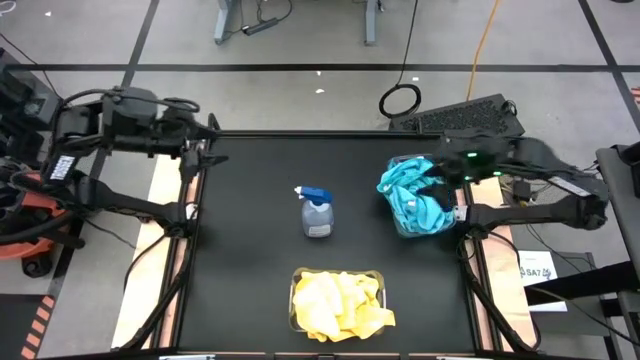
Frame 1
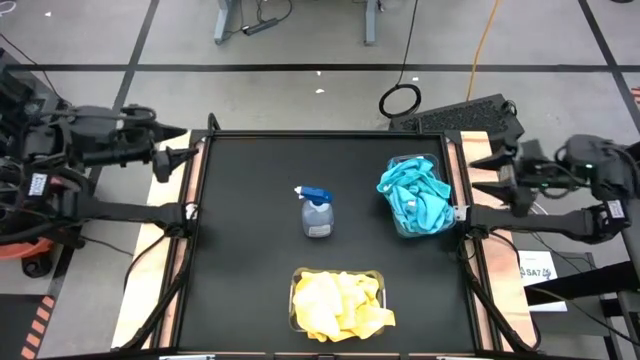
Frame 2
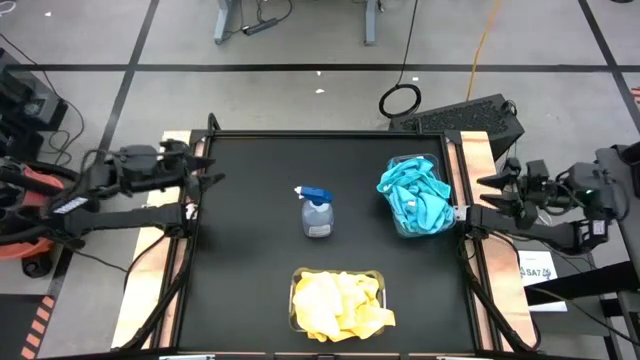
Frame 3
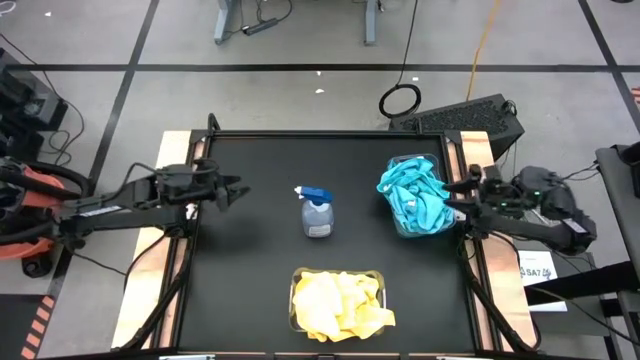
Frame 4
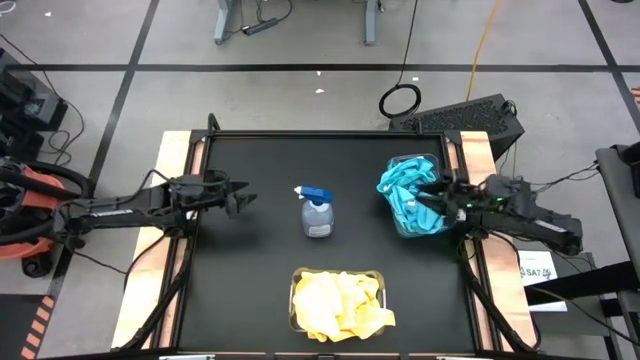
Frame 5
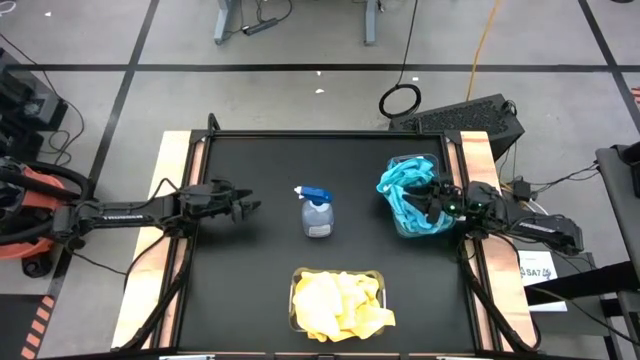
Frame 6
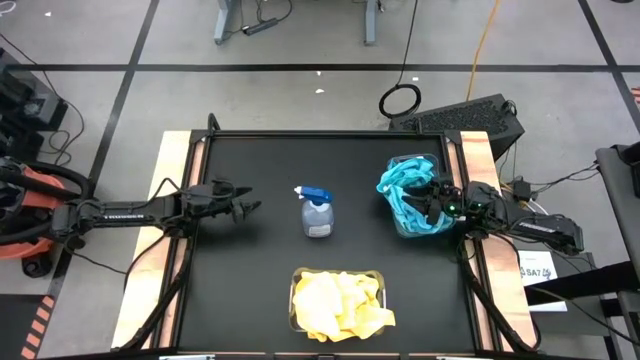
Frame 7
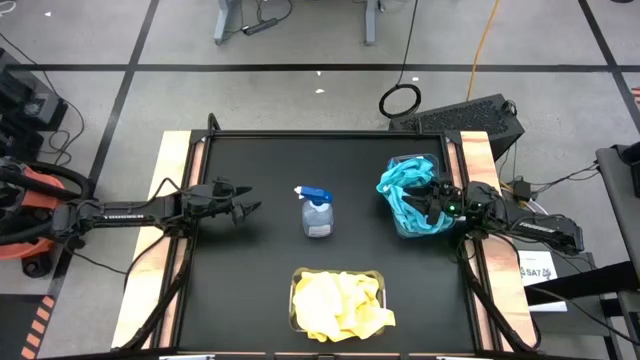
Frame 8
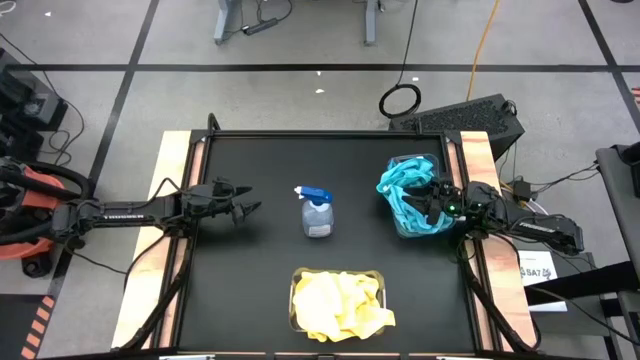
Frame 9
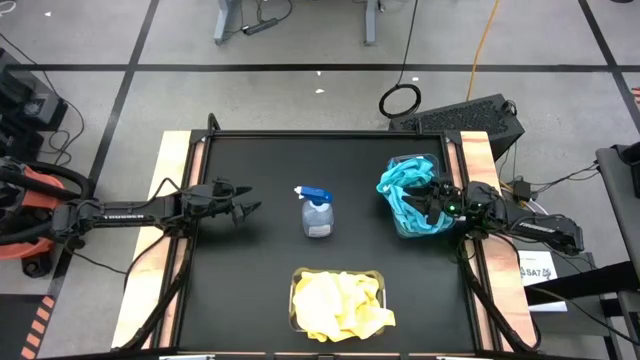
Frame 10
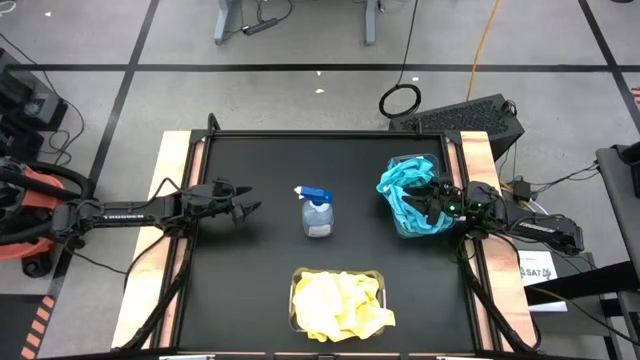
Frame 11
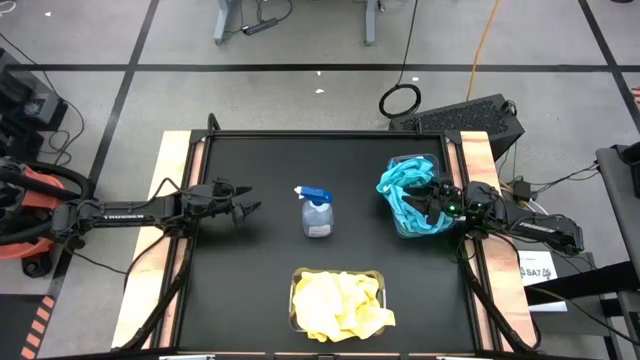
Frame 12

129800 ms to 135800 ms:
Task: Sort microfiber towel by color & place in baskets
Return to Home Position

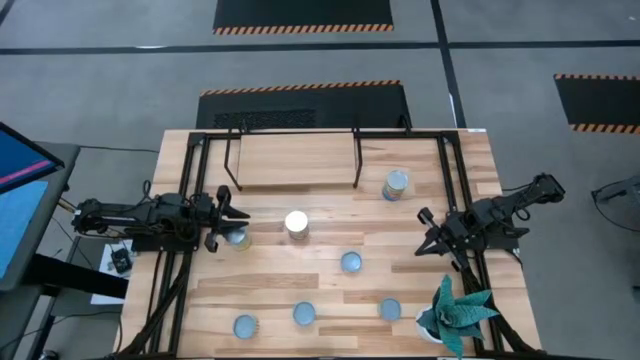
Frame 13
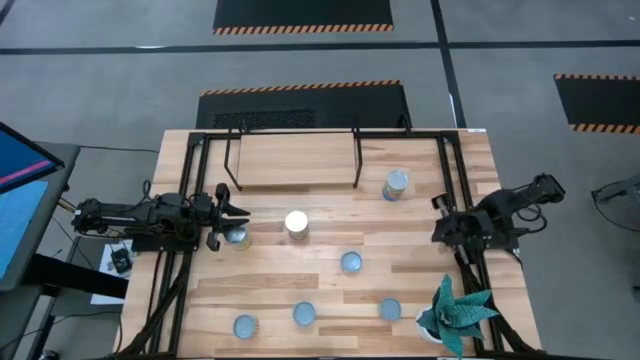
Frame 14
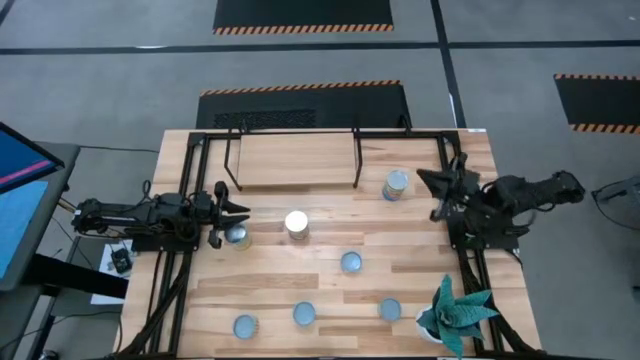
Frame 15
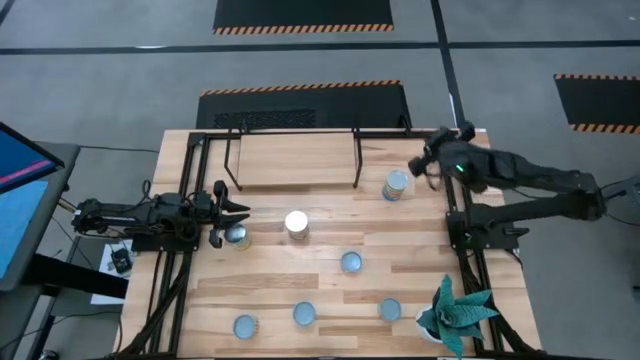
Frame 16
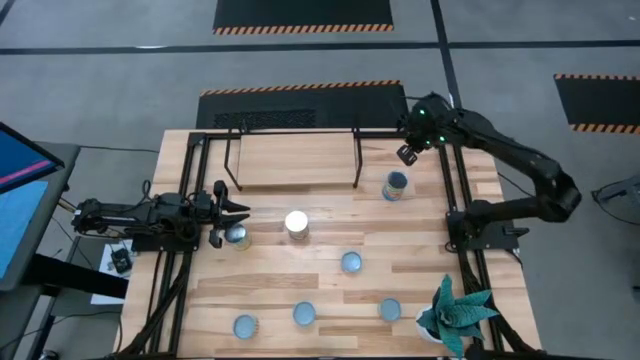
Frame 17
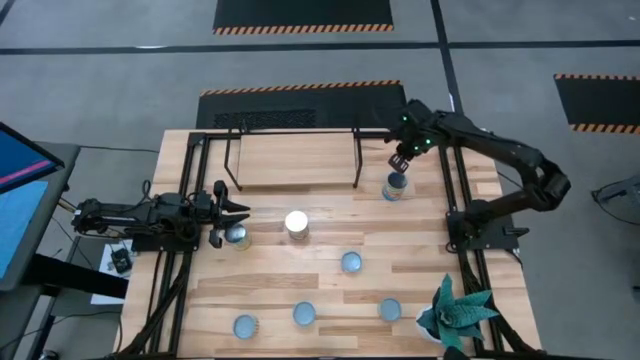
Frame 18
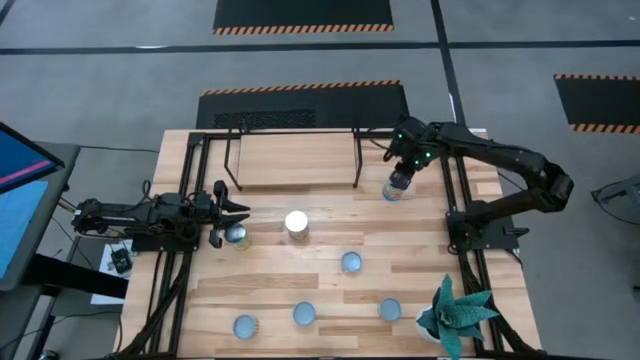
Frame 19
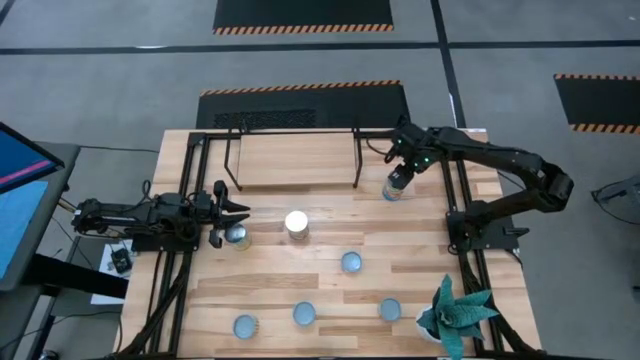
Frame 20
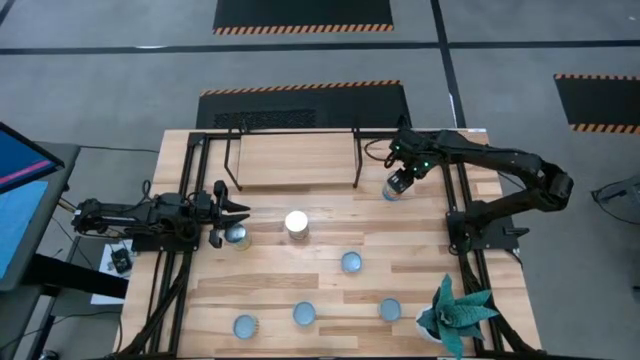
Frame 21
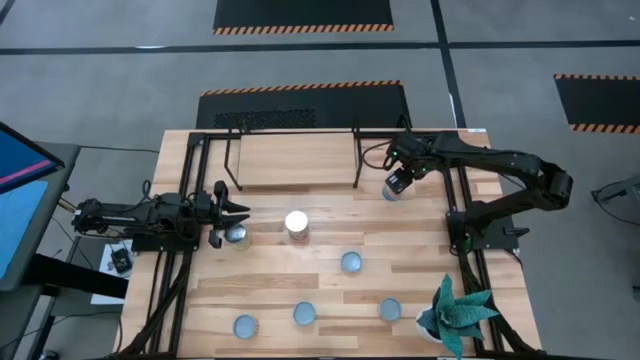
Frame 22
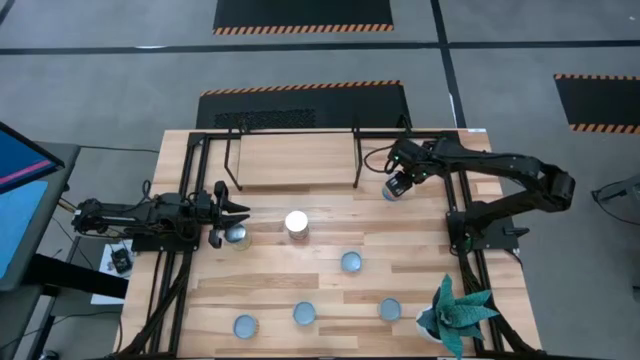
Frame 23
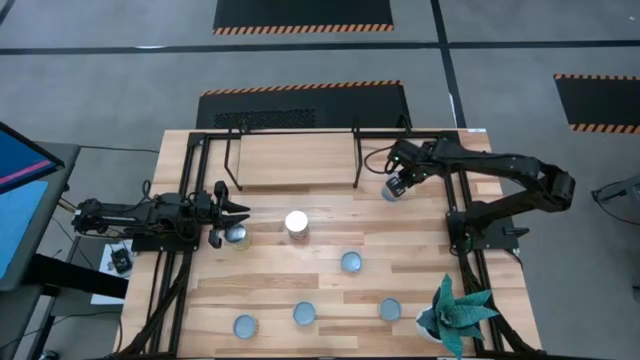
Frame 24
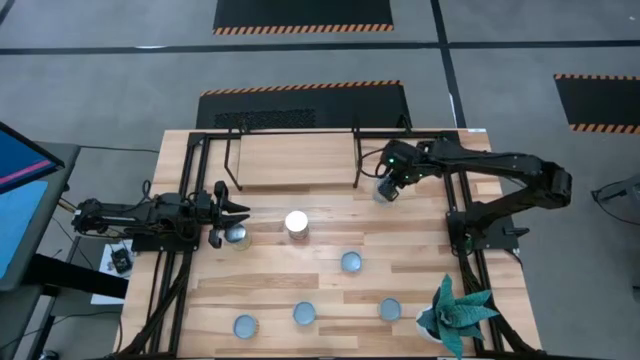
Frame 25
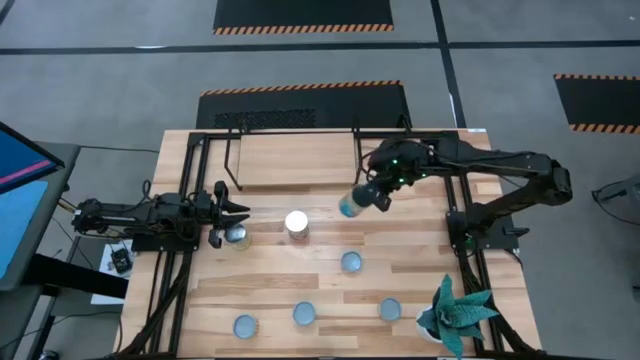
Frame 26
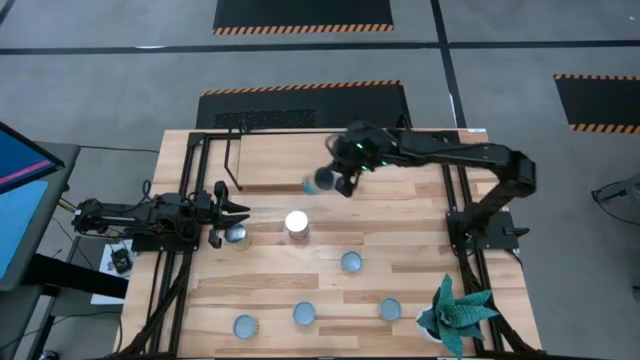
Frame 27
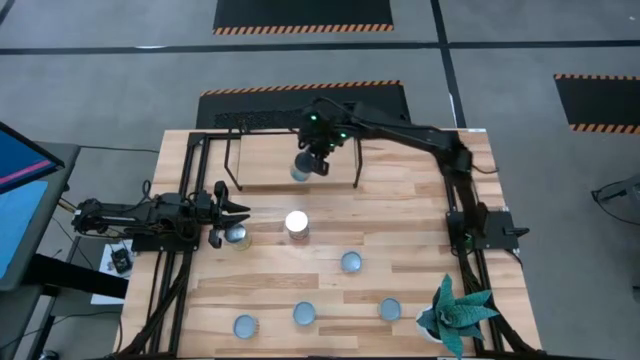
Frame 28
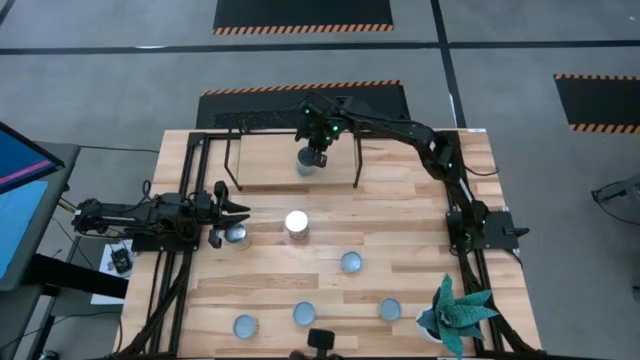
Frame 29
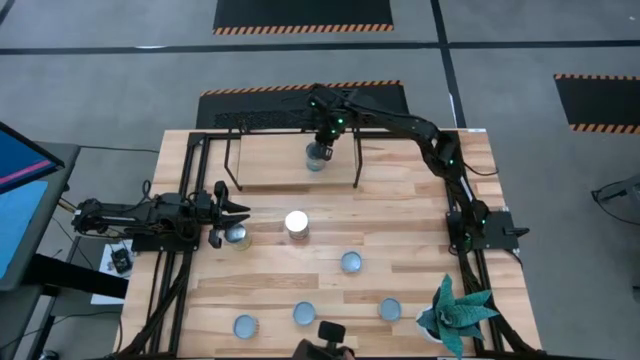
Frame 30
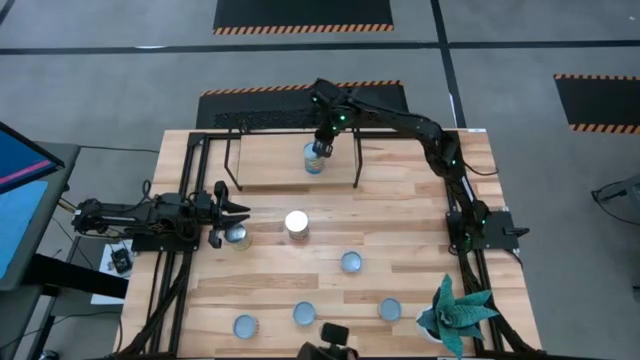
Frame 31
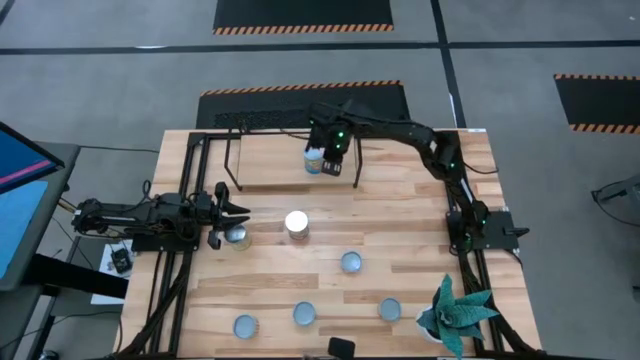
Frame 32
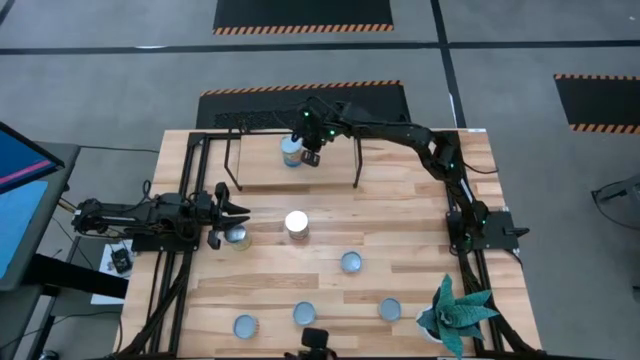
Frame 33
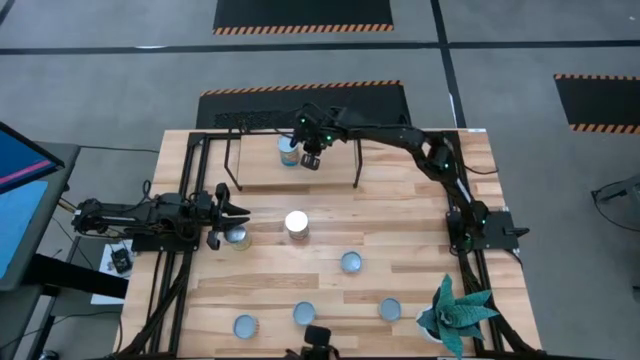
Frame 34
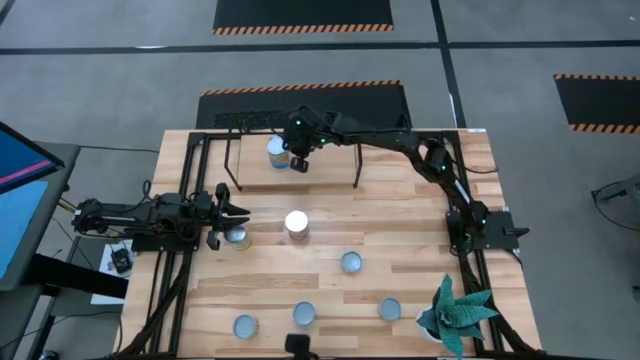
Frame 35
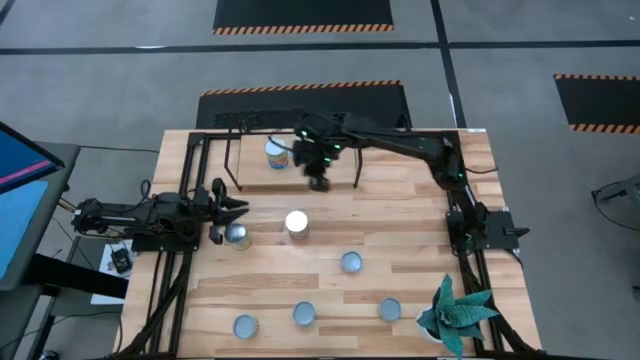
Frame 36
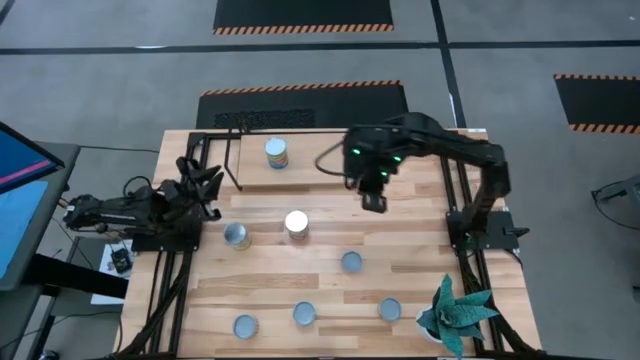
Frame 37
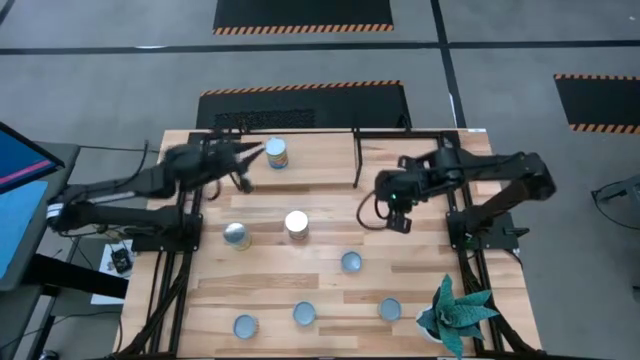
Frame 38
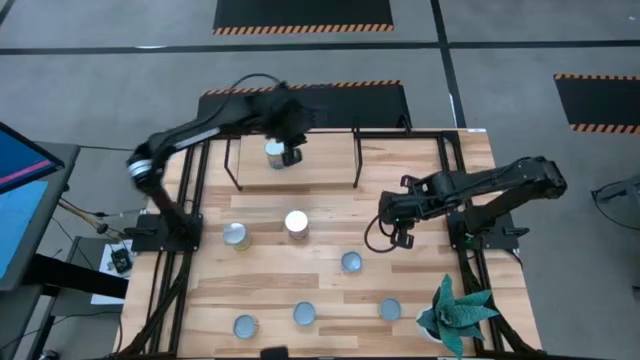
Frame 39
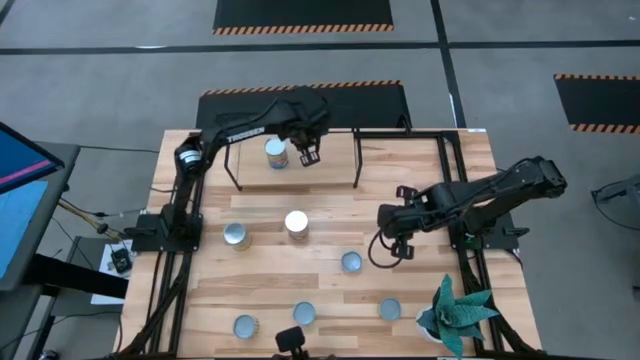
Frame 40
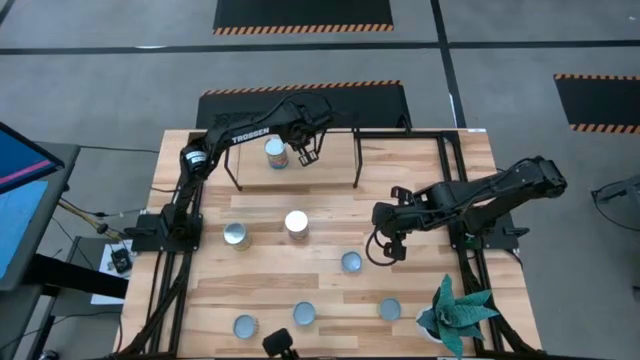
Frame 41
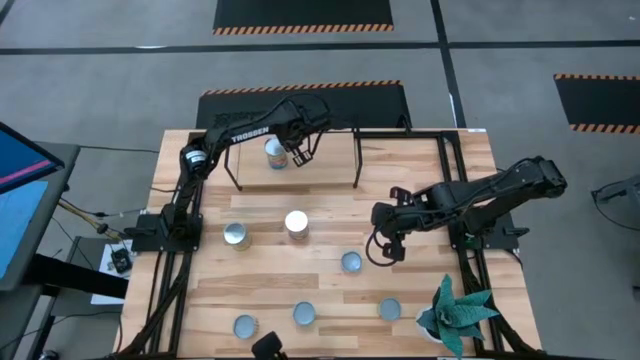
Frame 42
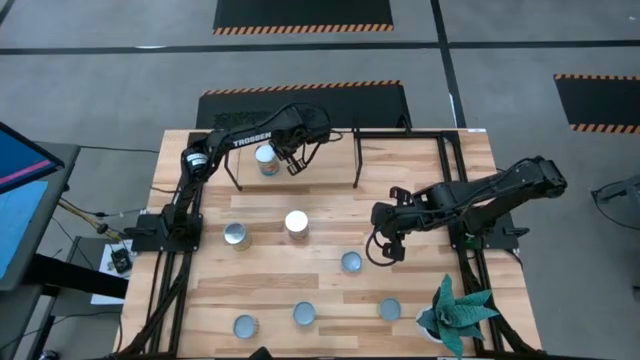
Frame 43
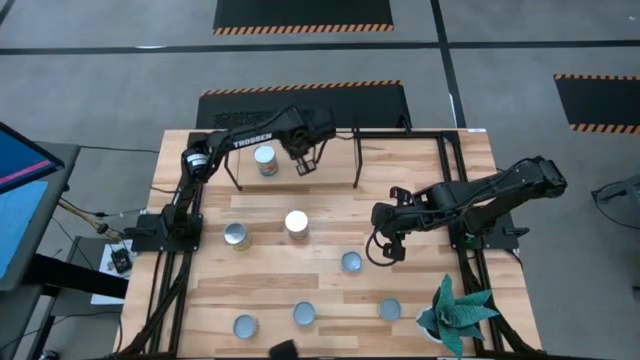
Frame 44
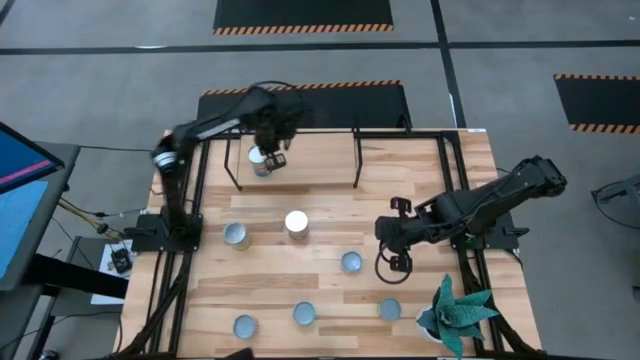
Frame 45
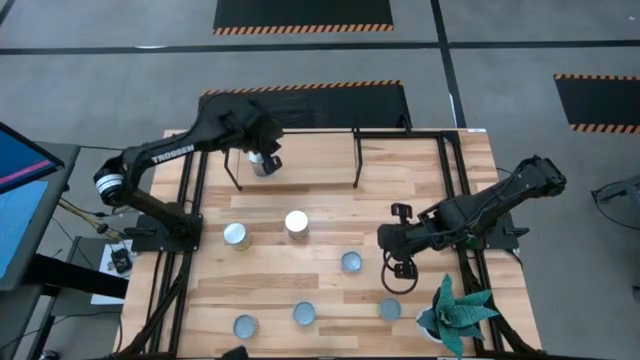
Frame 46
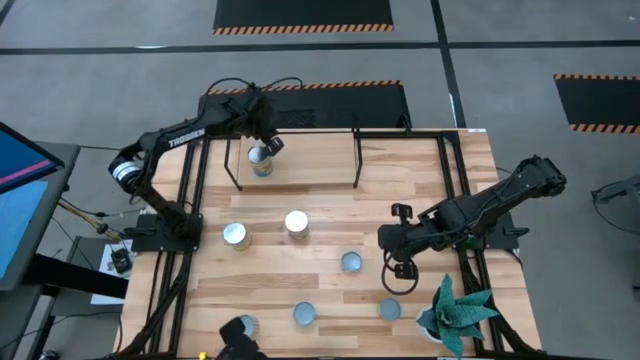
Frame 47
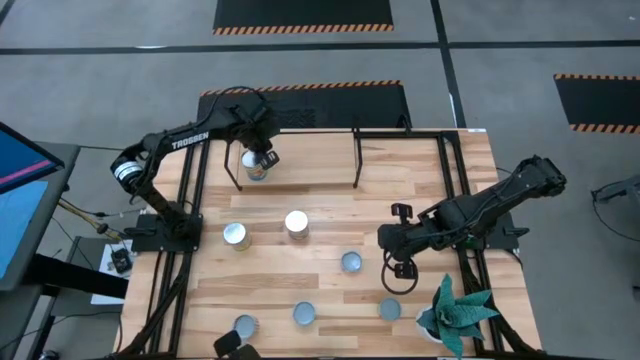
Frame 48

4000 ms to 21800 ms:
Task: Pick and place cans onto a shelf
Put the canned tomatoes on the shelf
